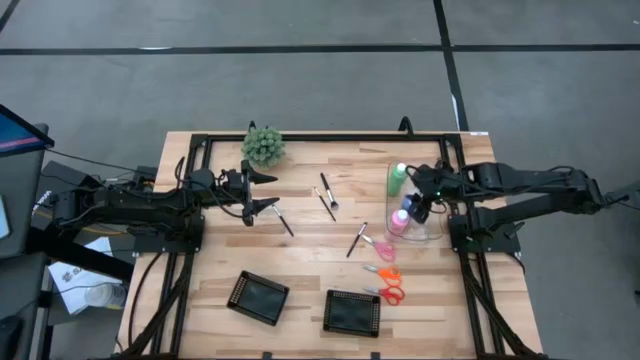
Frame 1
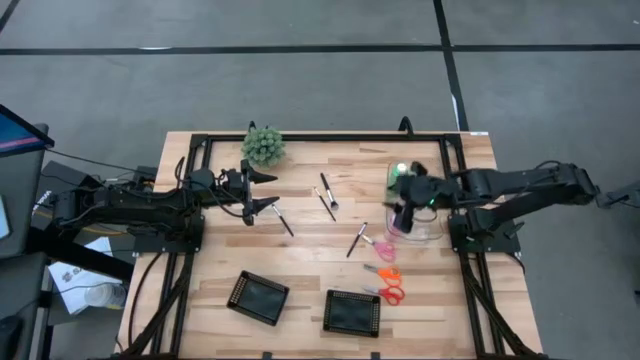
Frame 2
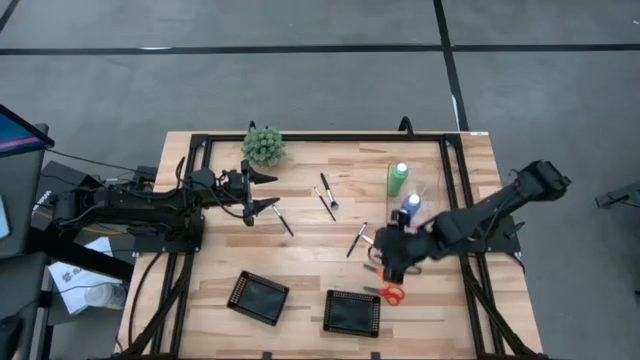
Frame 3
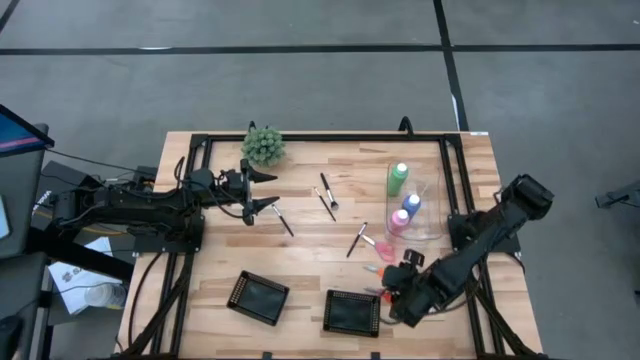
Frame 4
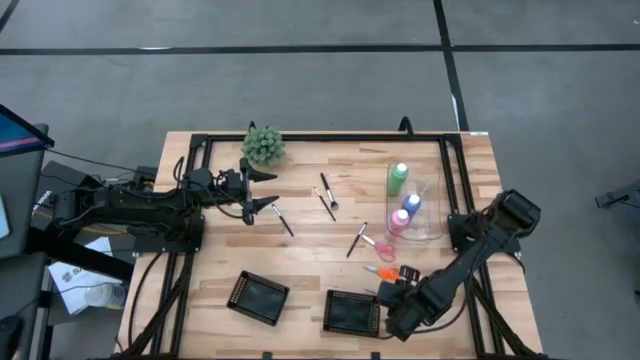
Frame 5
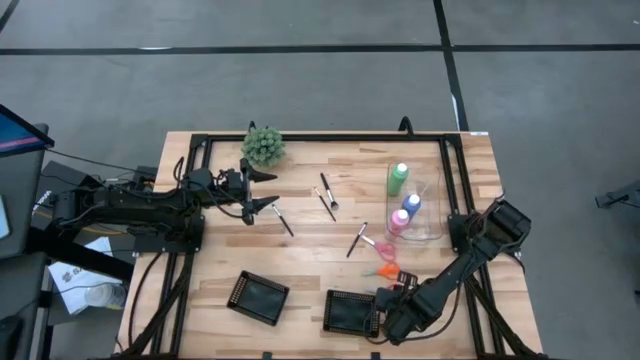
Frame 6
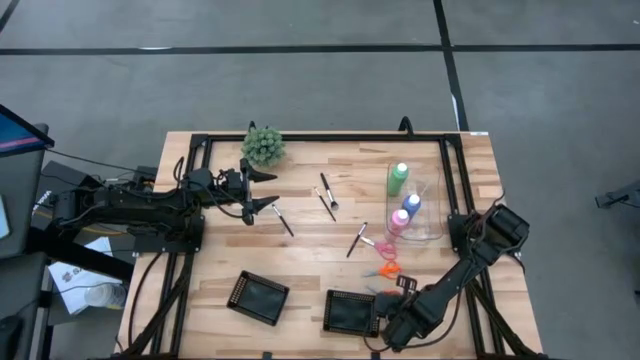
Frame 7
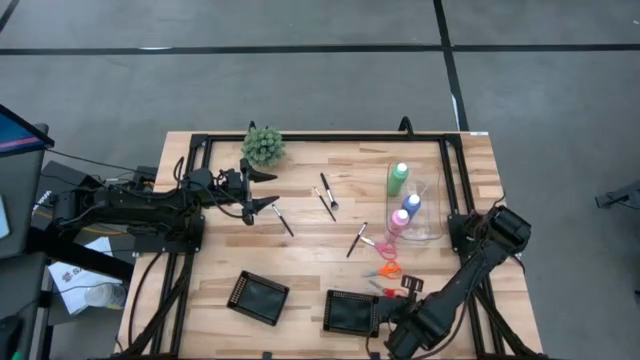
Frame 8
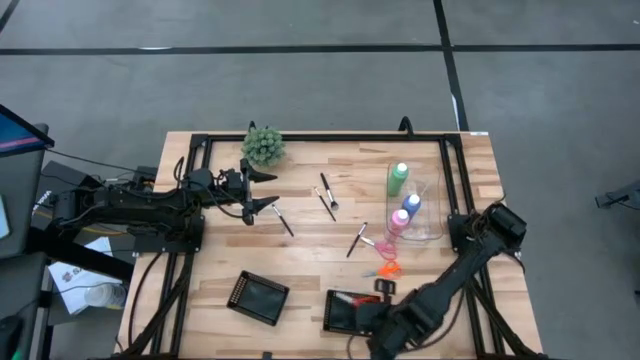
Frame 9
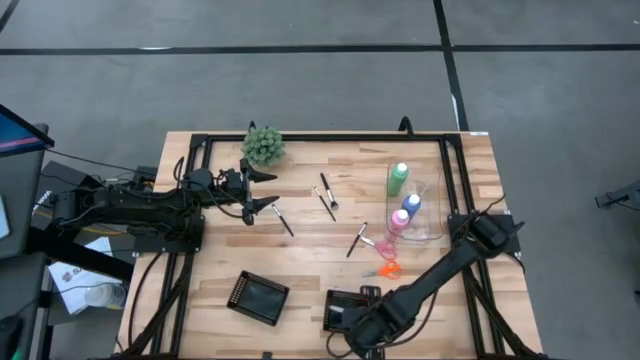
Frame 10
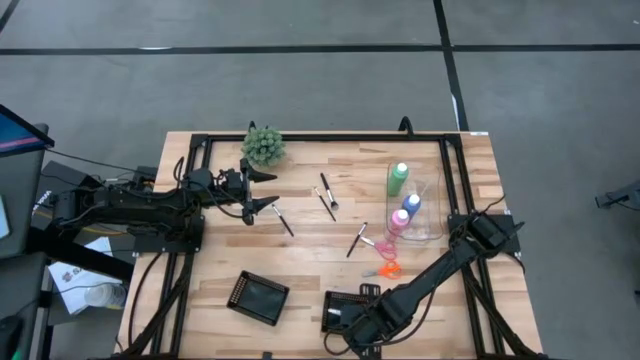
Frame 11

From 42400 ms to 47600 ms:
Task: Pick & Place Paint Supplies
Put the red scissors into the right black bin

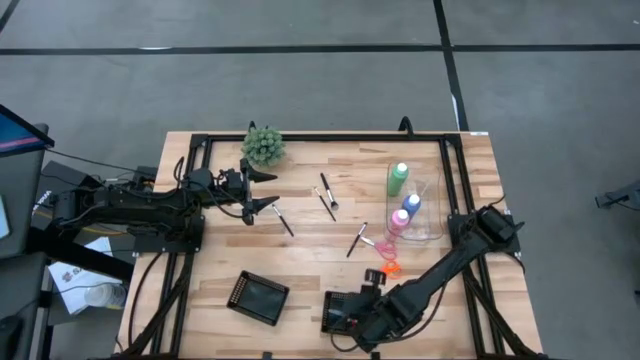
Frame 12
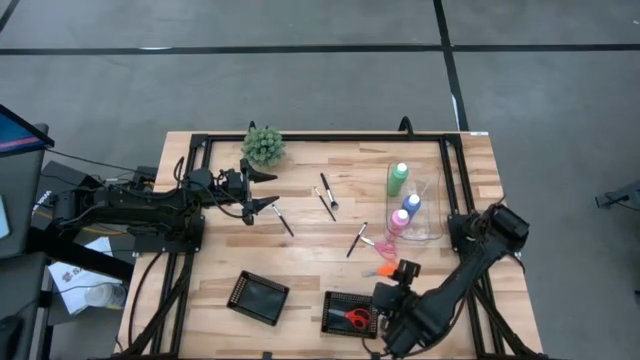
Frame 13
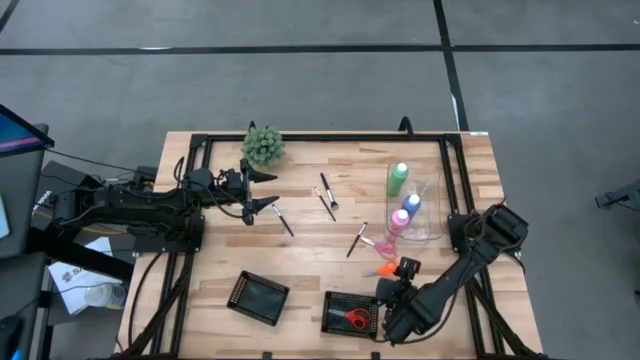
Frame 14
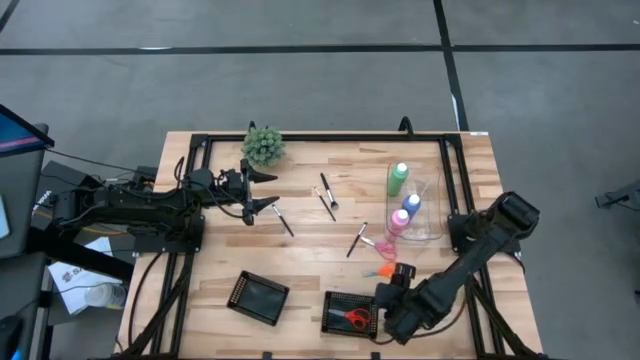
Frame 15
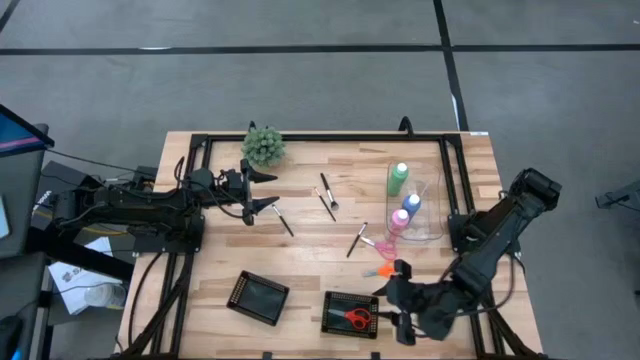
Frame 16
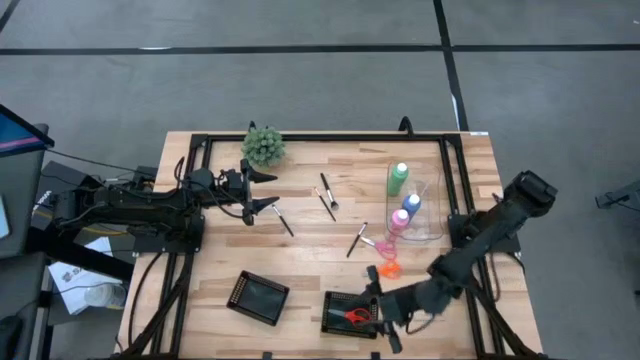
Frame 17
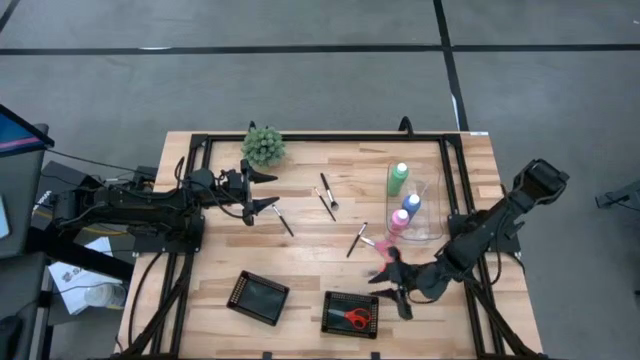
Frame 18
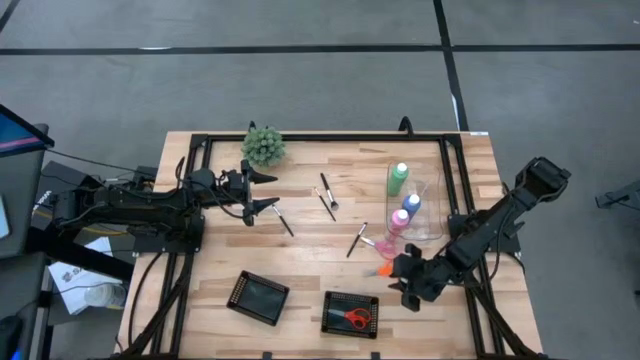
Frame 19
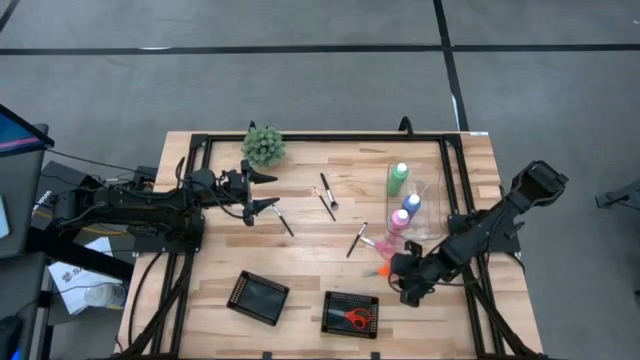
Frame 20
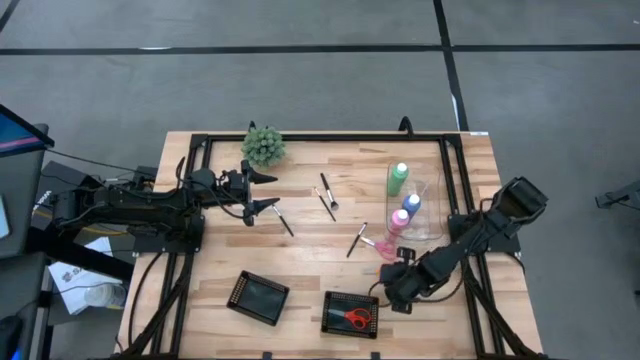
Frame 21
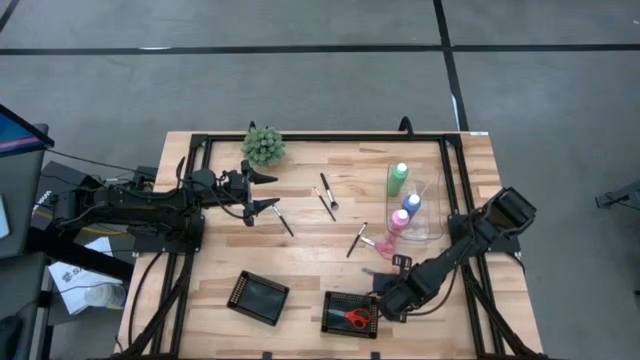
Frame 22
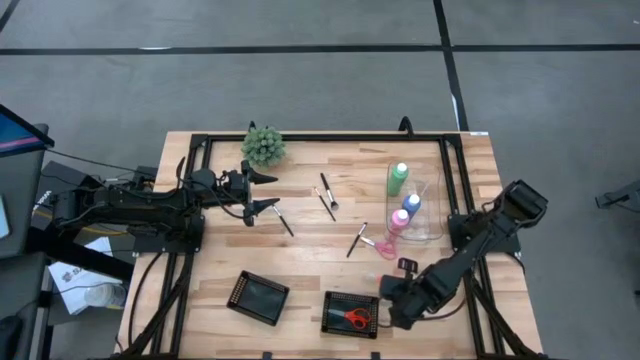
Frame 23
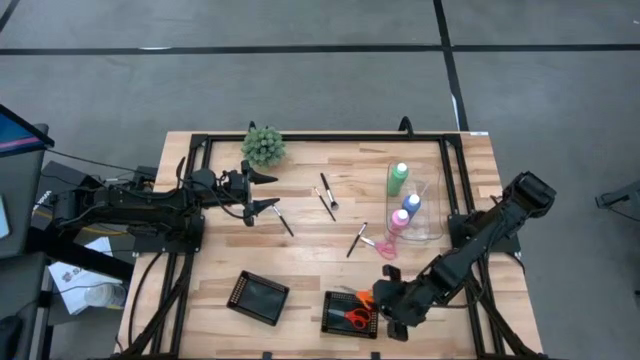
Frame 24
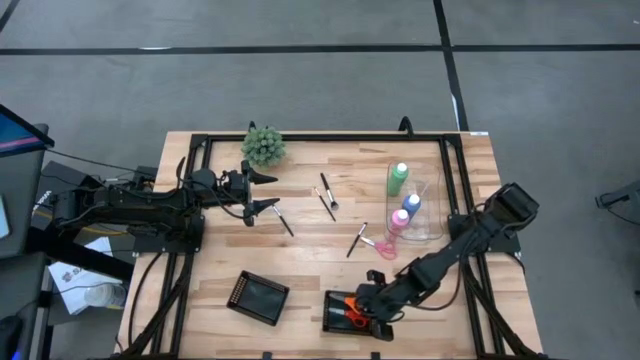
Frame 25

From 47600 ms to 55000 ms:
Put the orange scissors into the right black bin

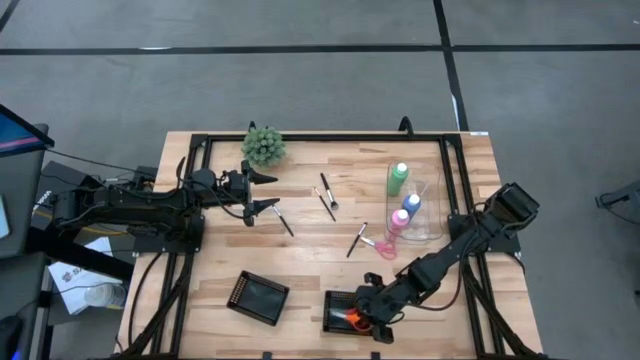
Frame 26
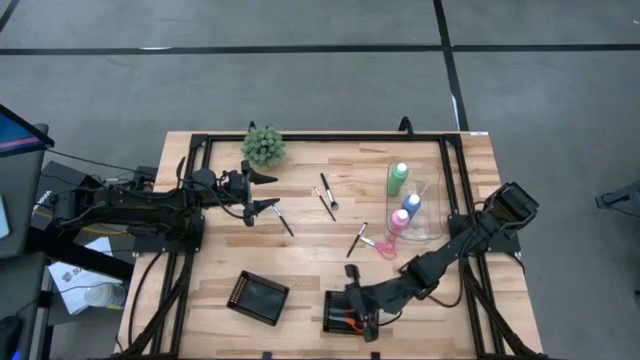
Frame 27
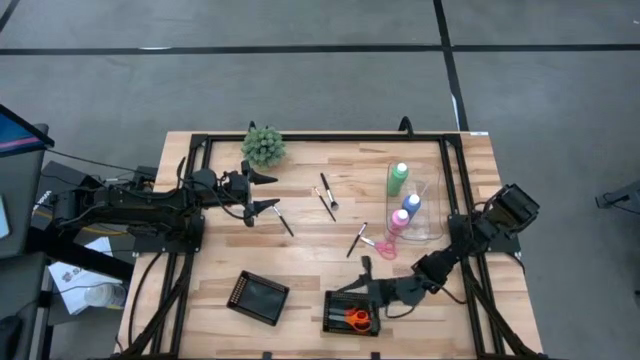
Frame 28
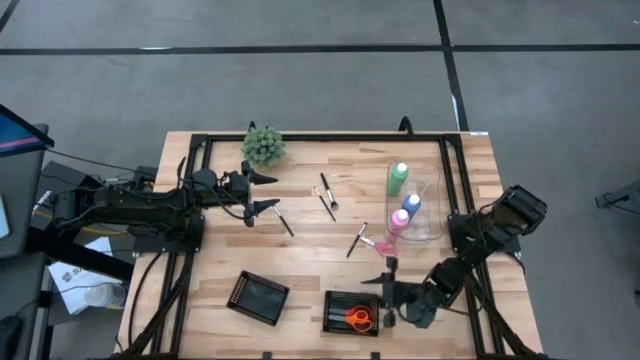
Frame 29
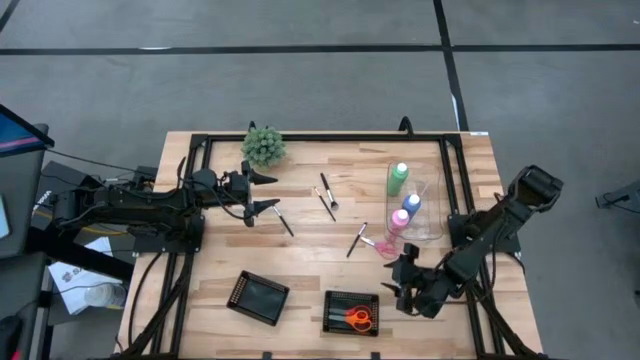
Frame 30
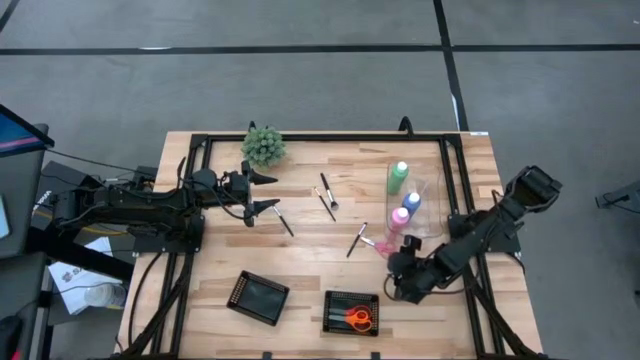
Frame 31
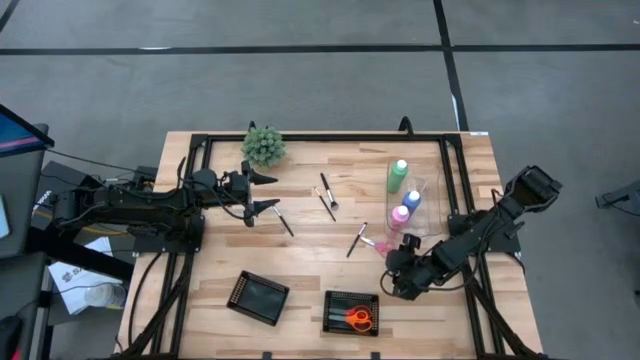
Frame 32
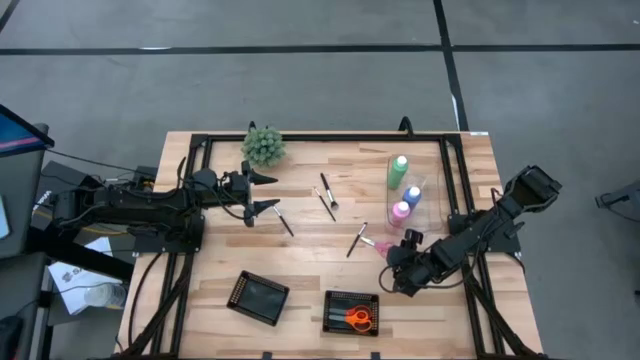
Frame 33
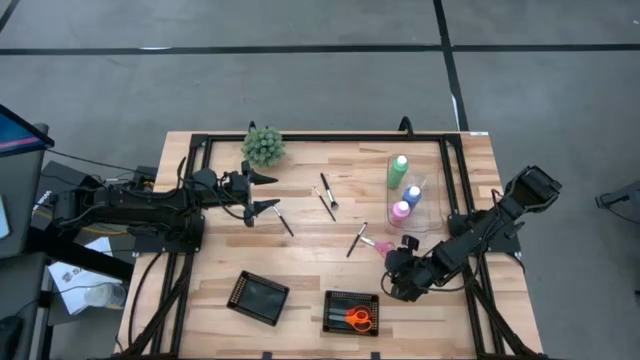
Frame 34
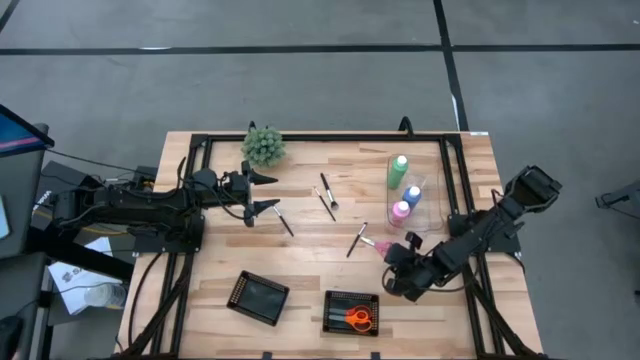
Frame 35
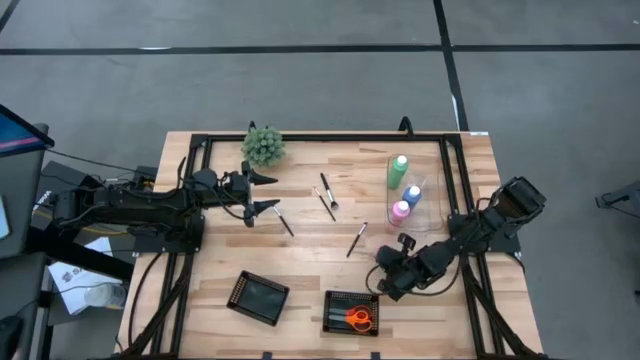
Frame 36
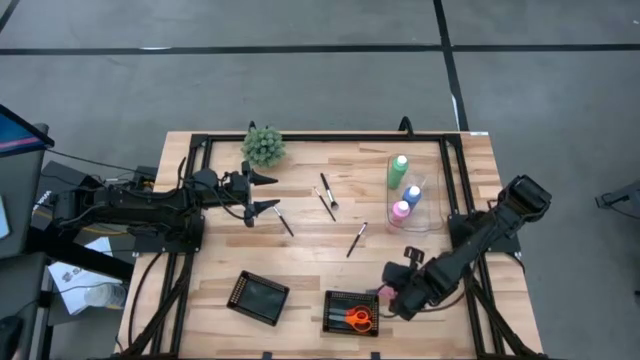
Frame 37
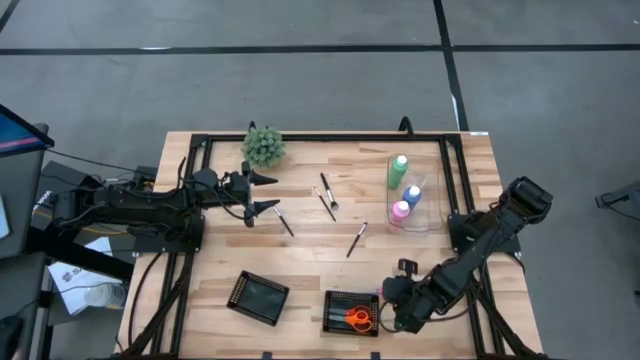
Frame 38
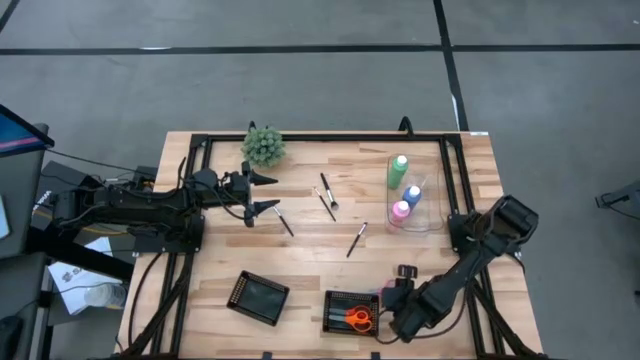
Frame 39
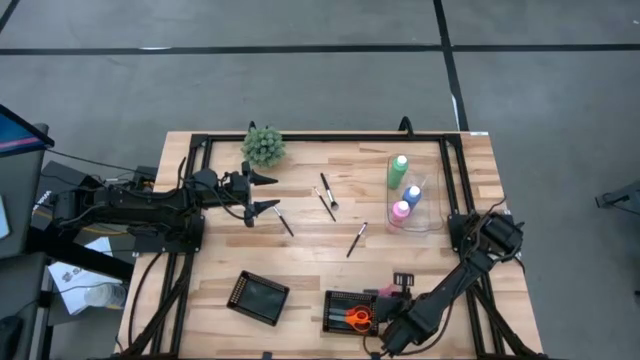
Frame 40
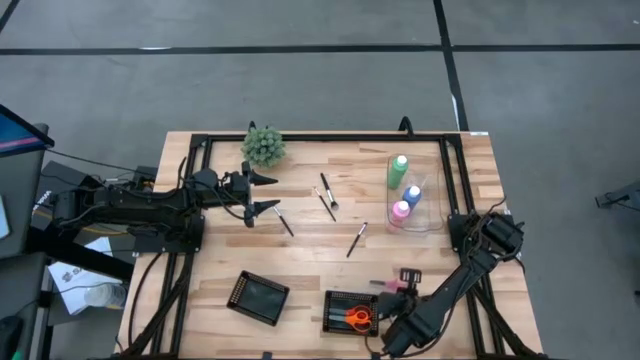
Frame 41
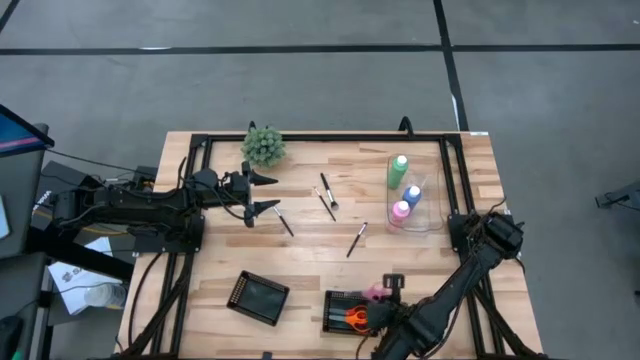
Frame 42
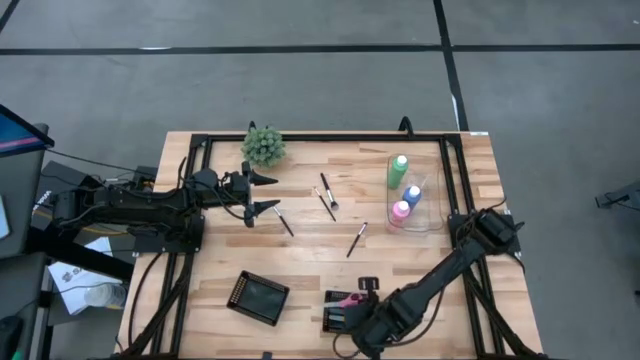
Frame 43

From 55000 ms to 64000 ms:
Put the pink scissors into the right black bin
